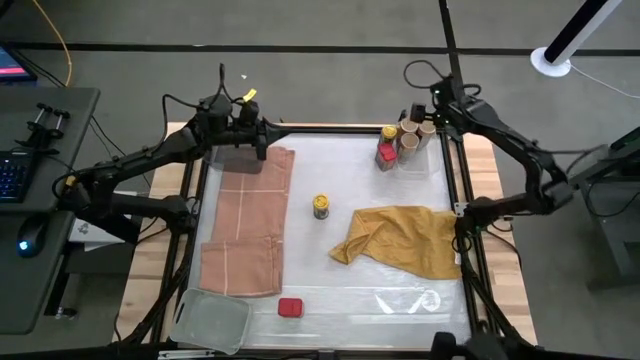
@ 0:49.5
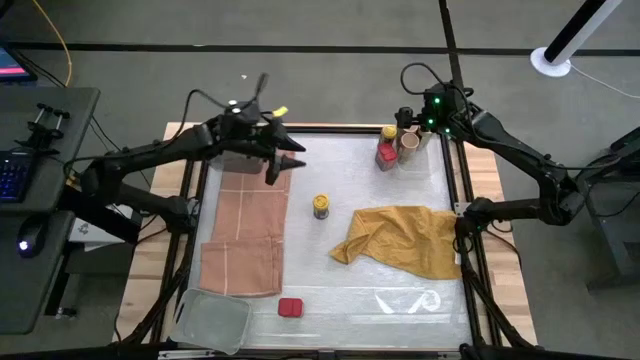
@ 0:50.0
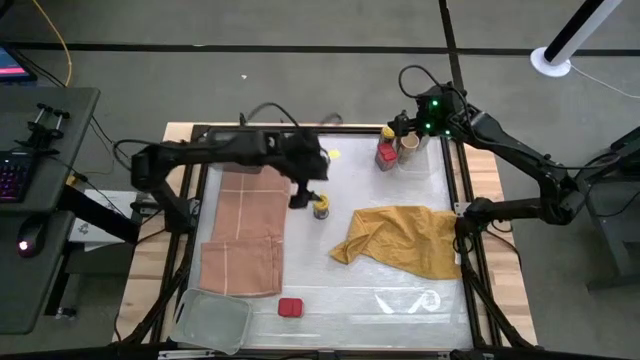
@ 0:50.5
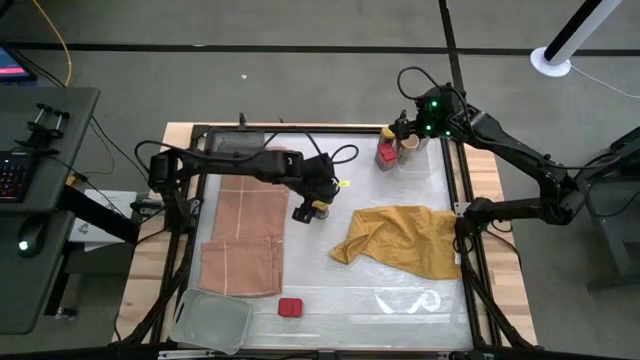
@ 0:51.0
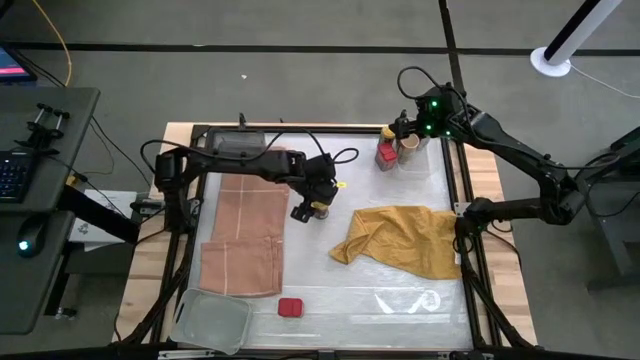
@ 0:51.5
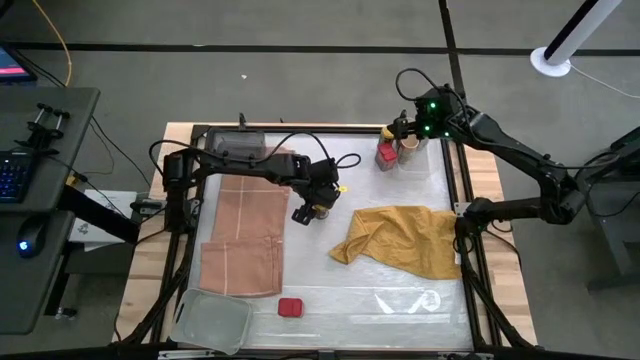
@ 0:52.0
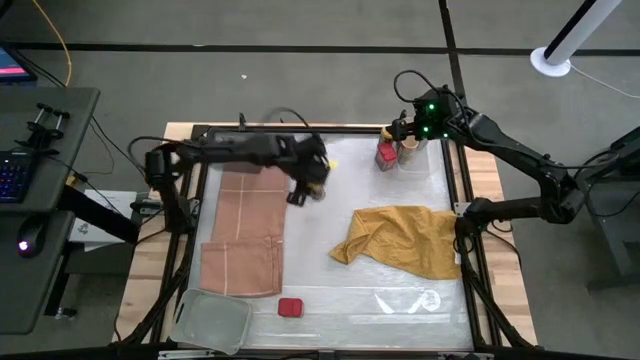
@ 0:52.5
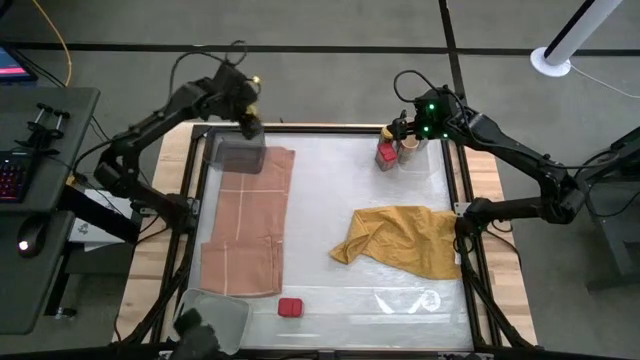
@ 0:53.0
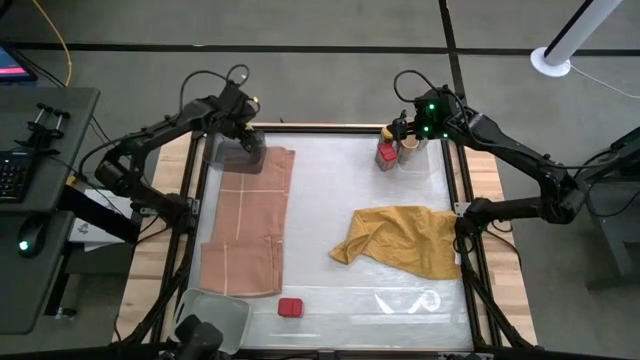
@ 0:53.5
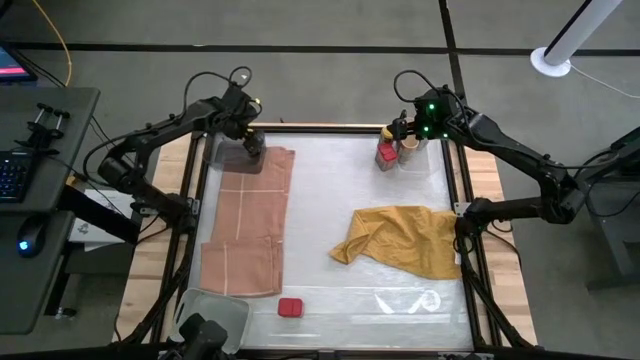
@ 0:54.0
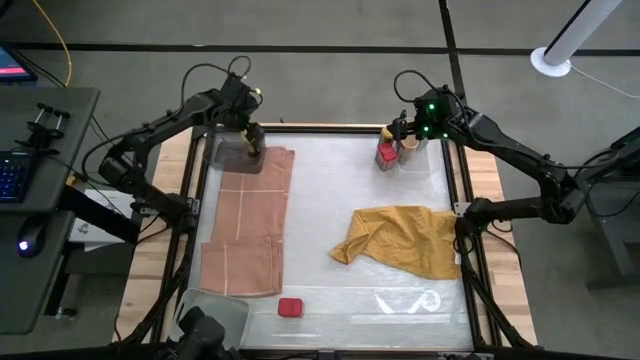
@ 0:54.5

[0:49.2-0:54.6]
Task: Sort spices by type
Put the bottom yellow seasoning bottle into the black bin

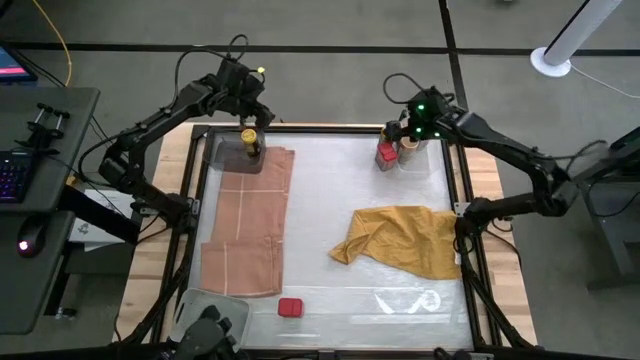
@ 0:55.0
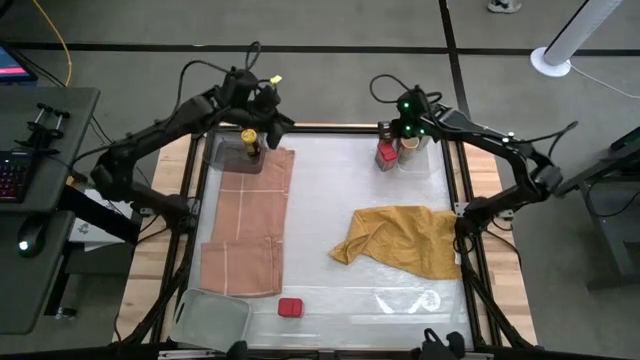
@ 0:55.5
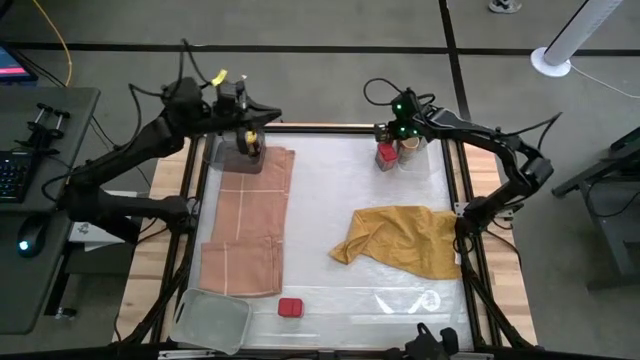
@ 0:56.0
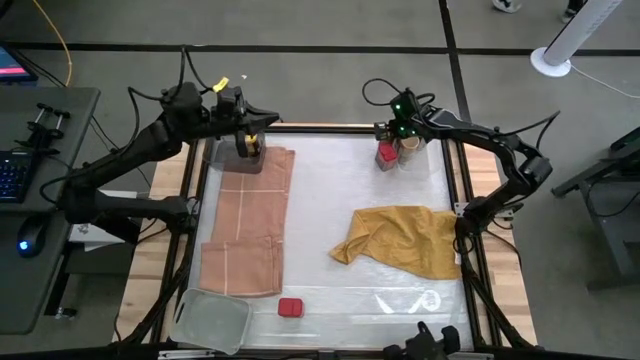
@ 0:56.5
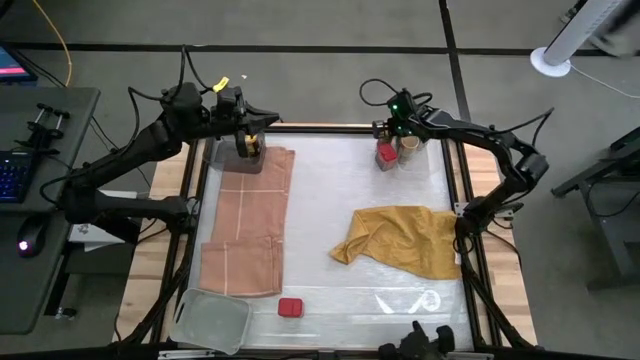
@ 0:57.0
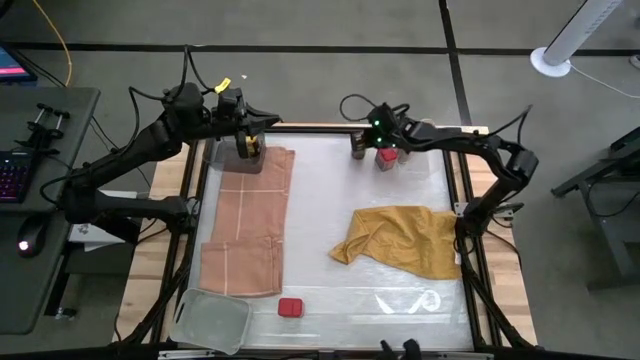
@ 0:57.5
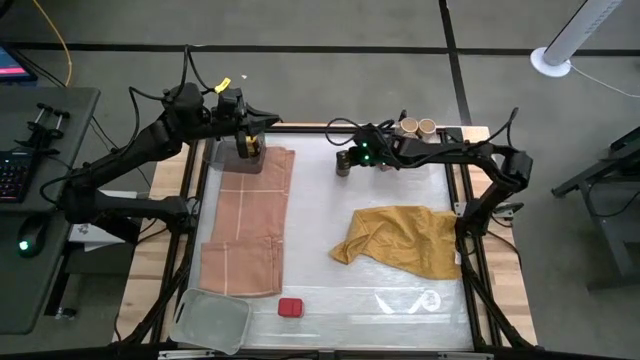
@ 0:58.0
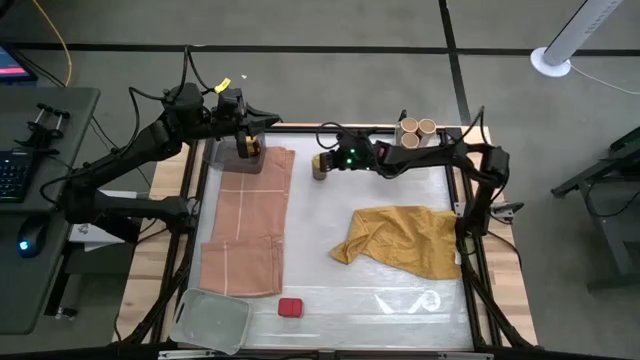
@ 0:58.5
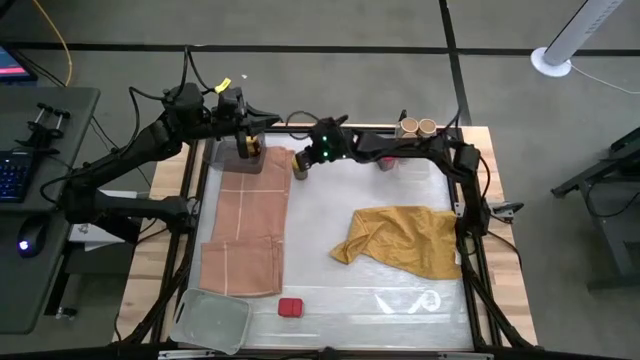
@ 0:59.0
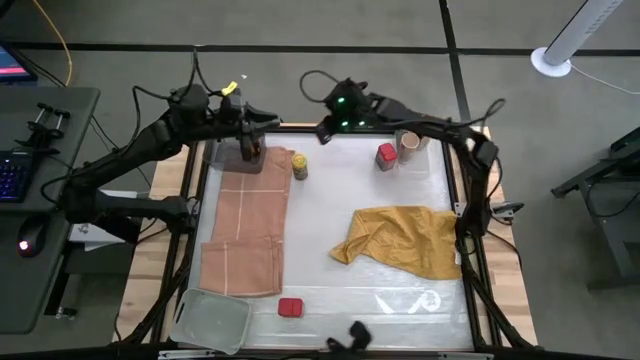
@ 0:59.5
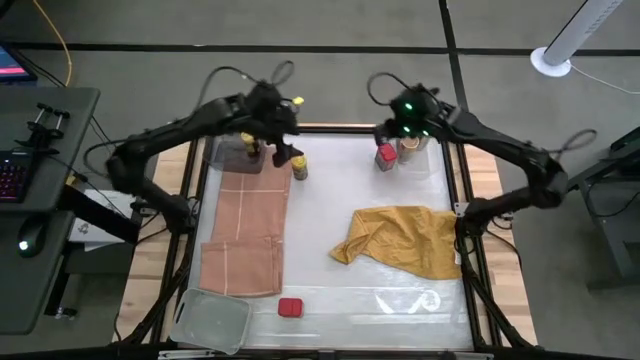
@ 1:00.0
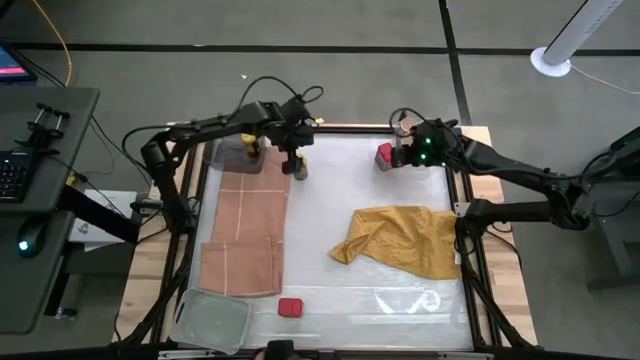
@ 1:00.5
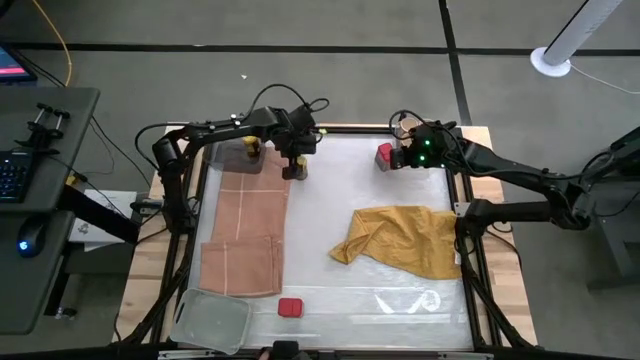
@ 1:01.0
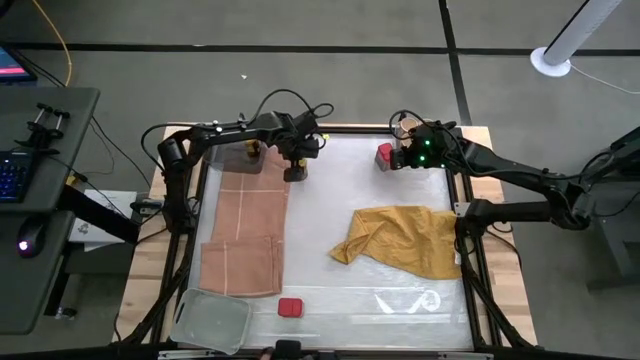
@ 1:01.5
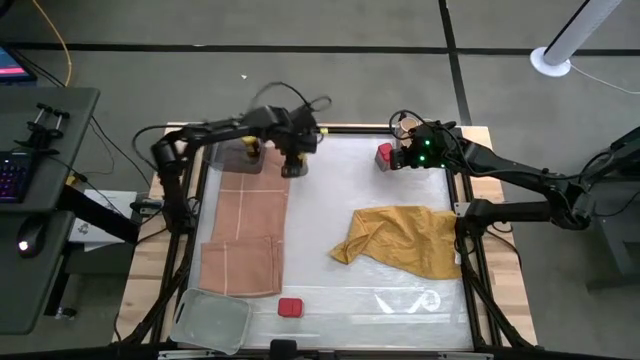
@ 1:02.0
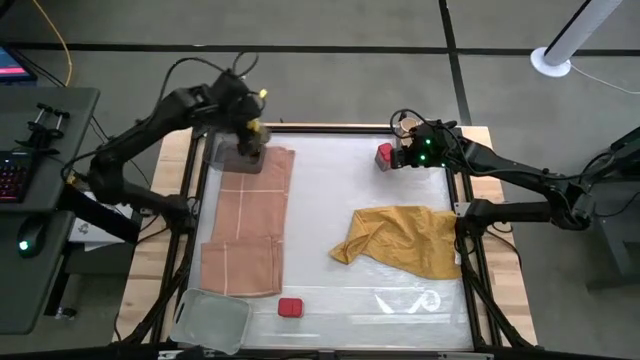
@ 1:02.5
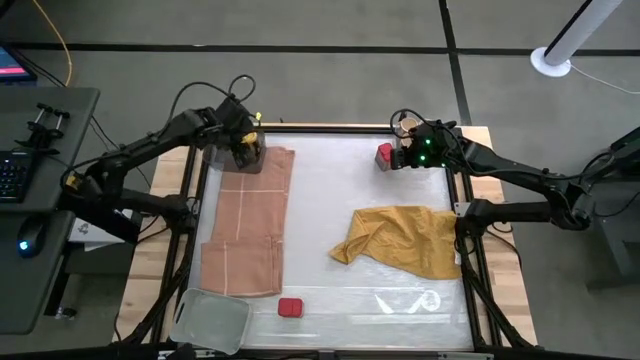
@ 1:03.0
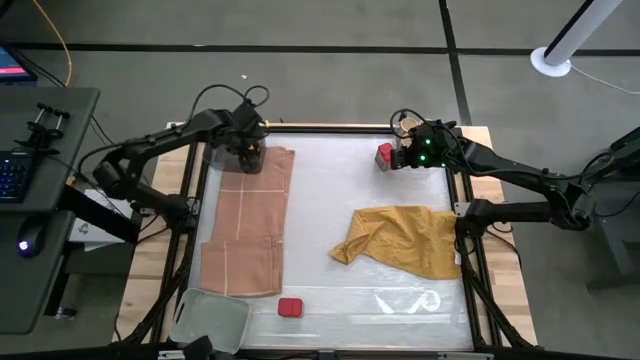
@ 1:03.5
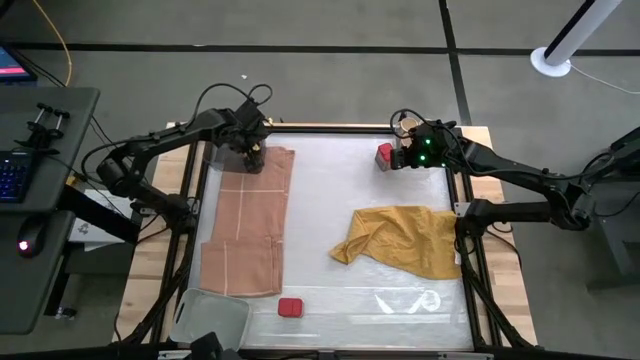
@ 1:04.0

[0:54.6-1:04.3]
Put the yellow seasoning bottle into the black bin

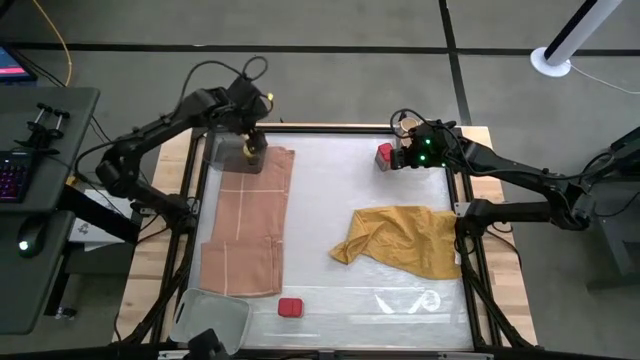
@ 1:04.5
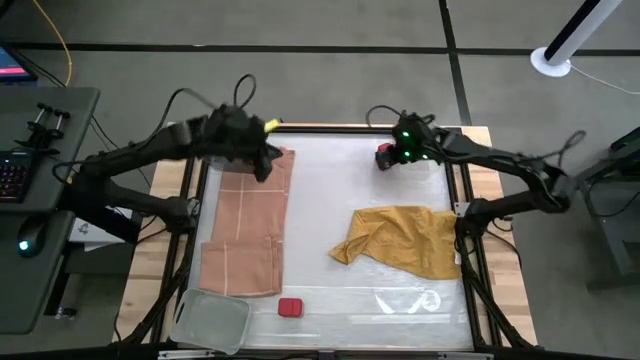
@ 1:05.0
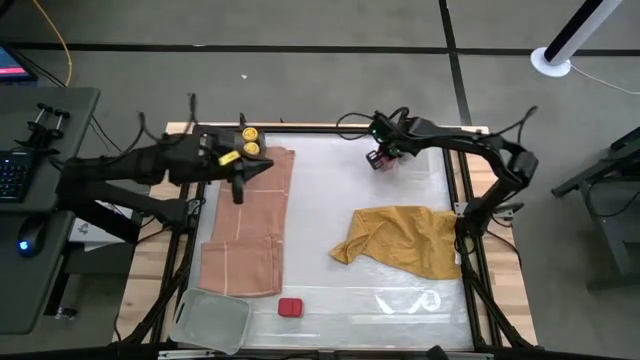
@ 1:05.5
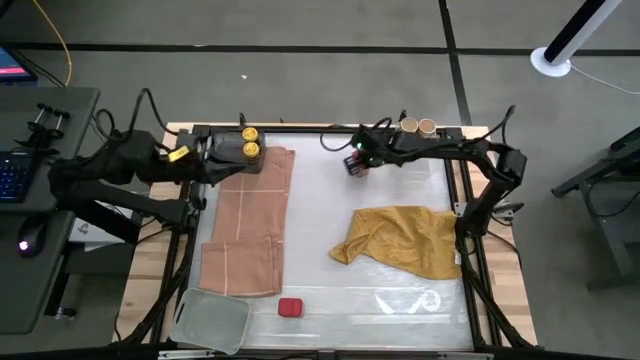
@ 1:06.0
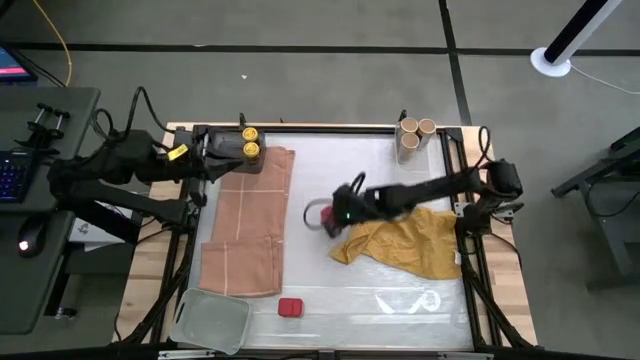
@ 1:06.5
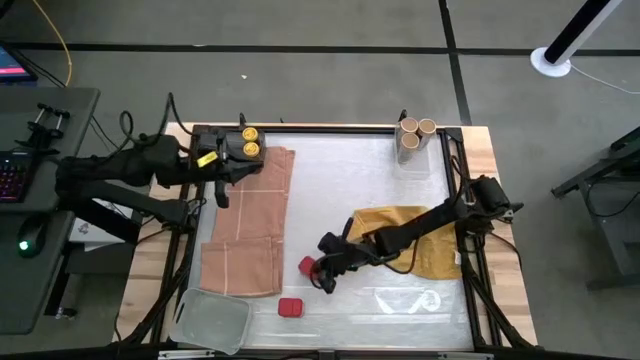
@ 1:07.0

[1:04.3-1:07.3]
Move the top red seasoning can to the bottom of the table

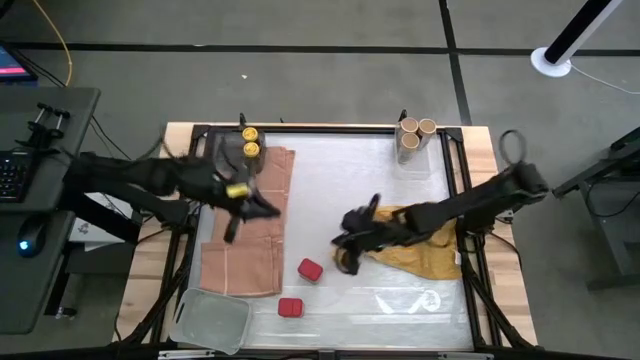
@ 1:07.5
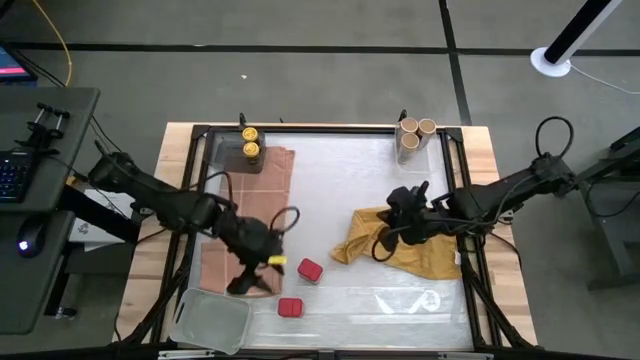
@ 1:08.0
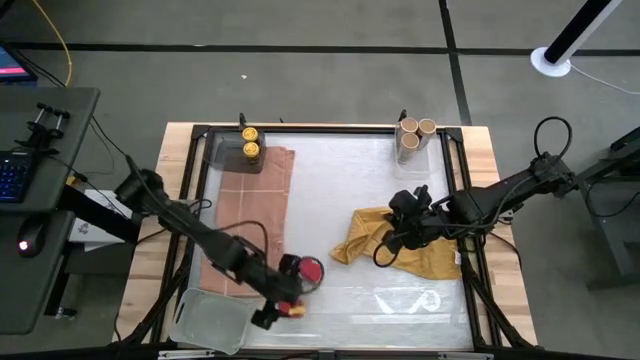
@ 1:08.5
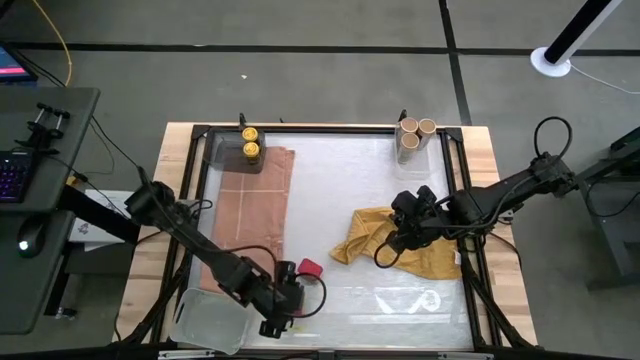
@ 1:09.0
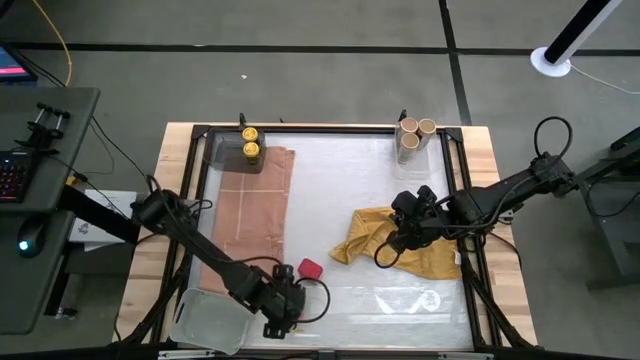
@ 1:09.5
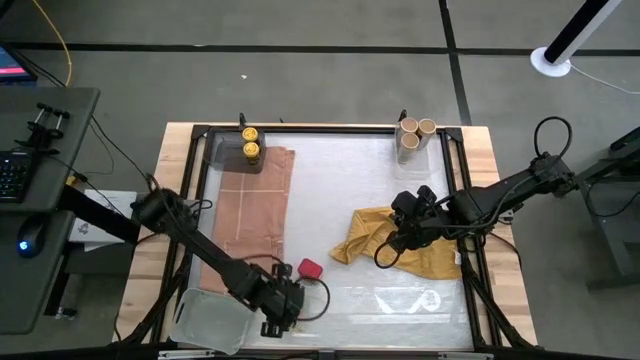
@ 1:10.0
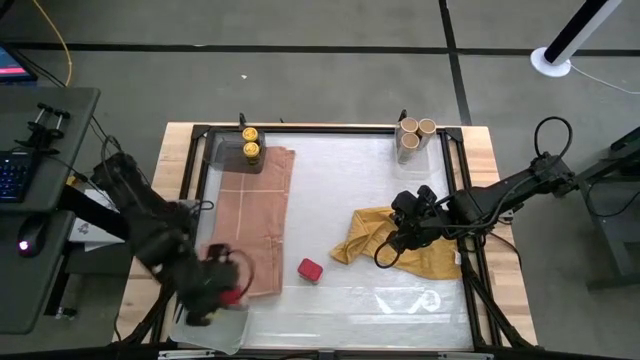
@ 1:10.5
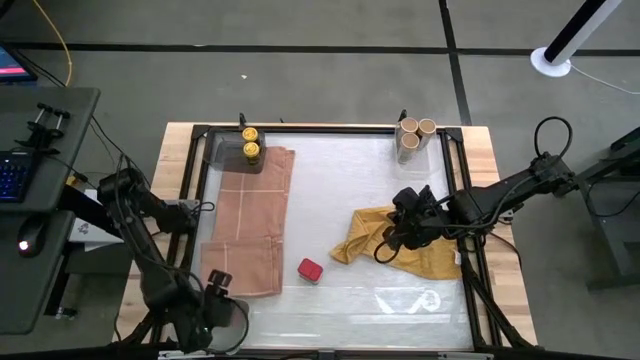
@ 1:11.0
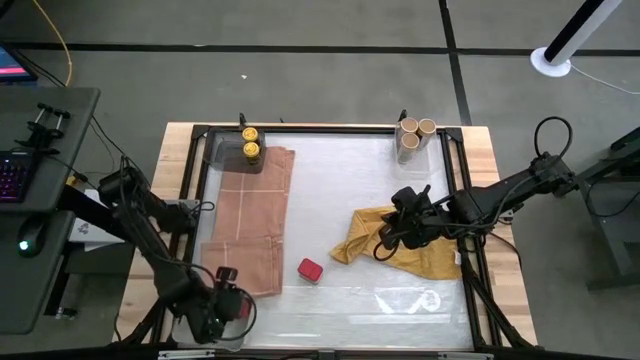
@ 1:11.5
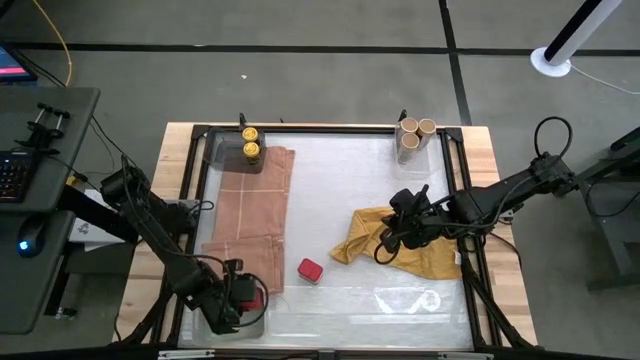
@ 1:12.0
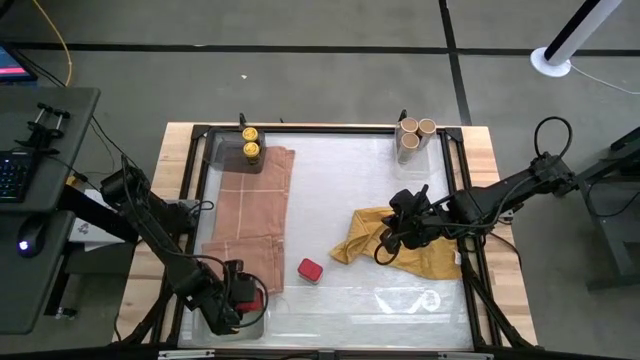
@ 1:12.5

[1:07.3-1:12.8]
Put the bottom red seasoning can into the gray bin
